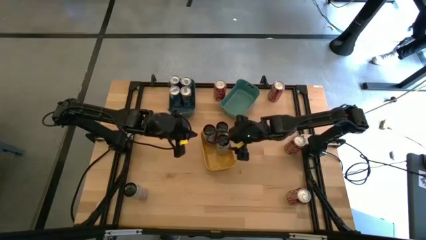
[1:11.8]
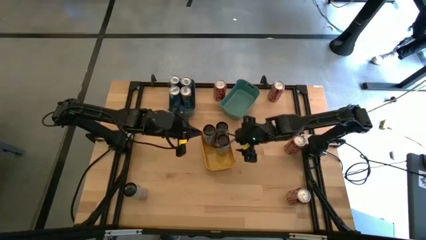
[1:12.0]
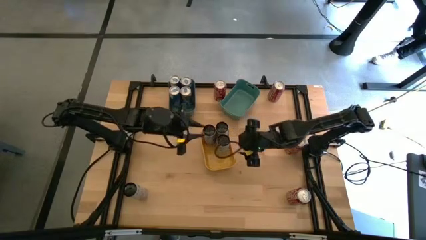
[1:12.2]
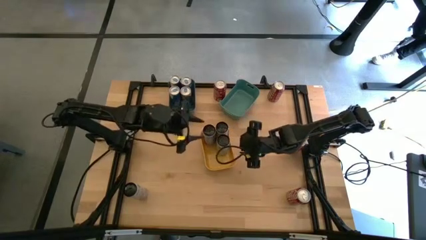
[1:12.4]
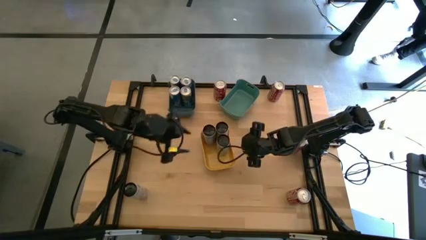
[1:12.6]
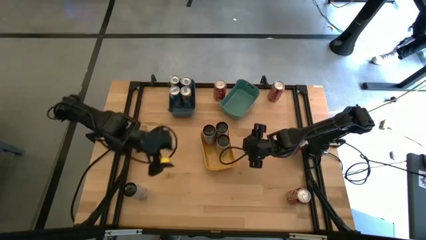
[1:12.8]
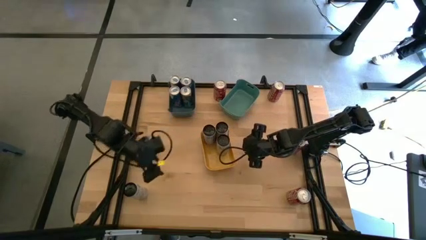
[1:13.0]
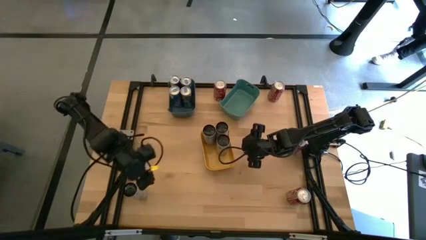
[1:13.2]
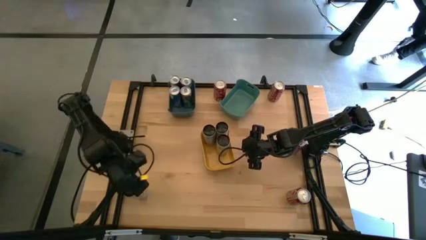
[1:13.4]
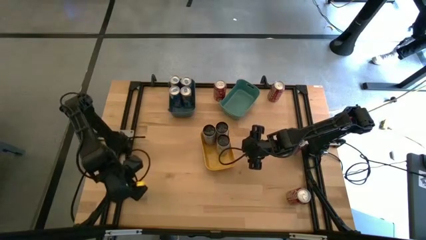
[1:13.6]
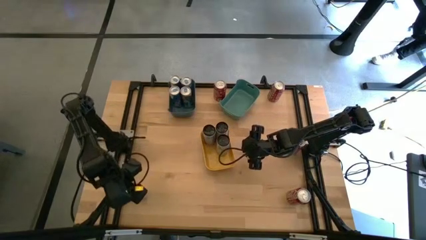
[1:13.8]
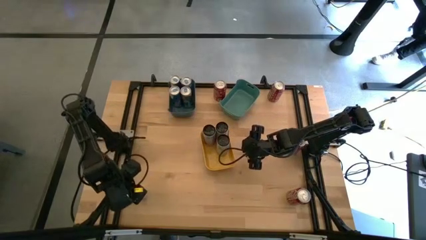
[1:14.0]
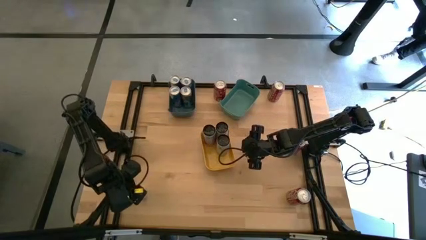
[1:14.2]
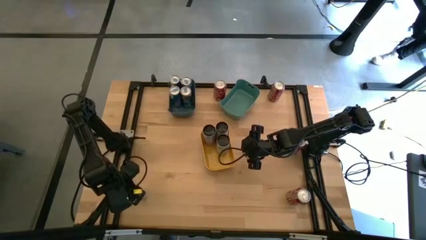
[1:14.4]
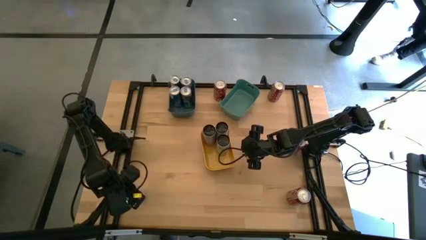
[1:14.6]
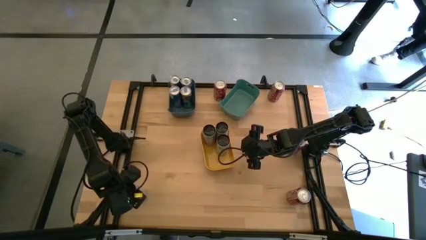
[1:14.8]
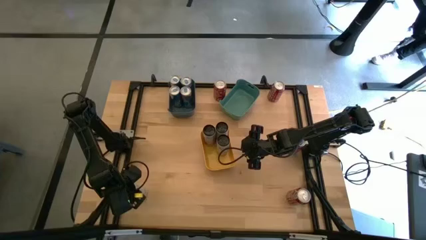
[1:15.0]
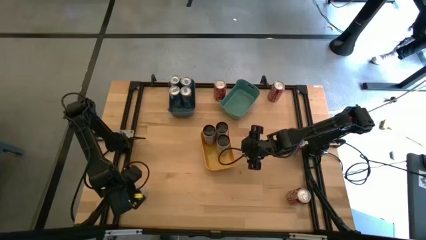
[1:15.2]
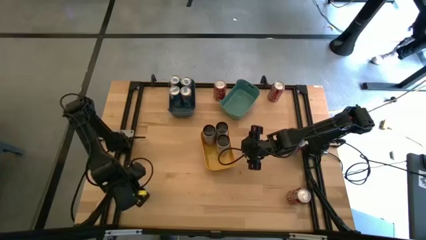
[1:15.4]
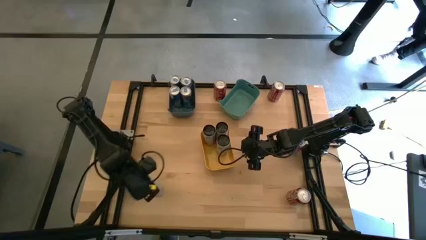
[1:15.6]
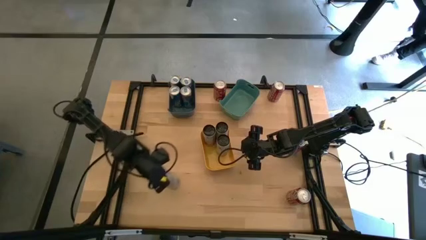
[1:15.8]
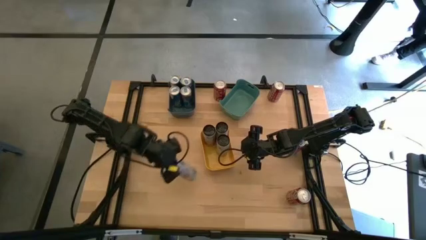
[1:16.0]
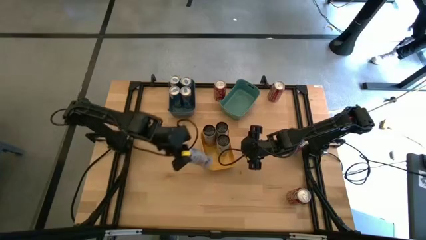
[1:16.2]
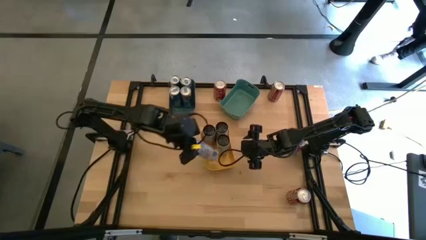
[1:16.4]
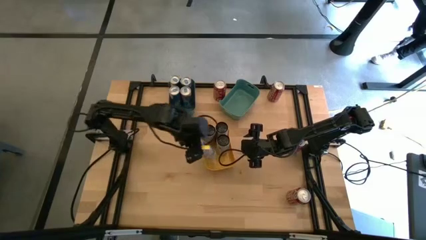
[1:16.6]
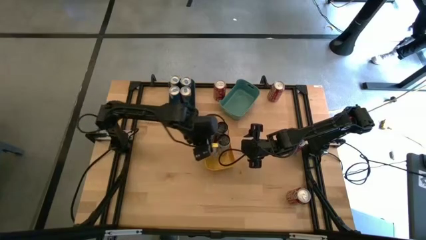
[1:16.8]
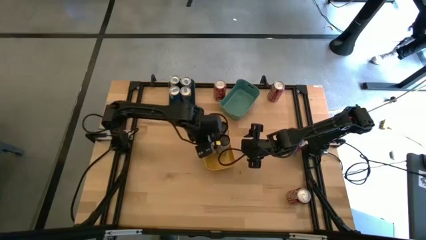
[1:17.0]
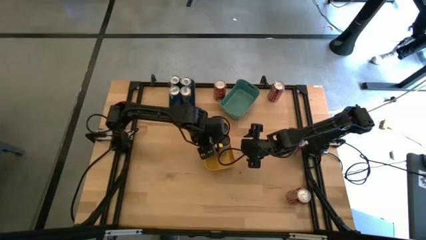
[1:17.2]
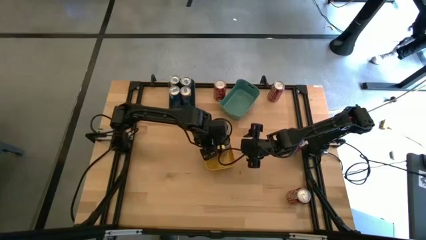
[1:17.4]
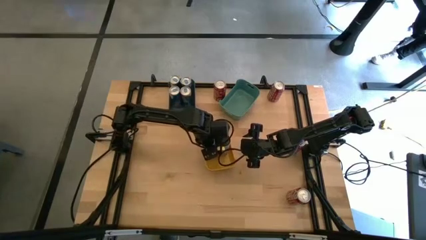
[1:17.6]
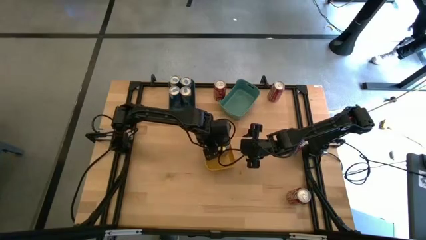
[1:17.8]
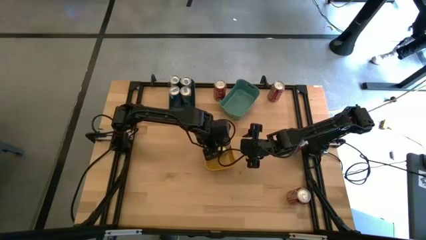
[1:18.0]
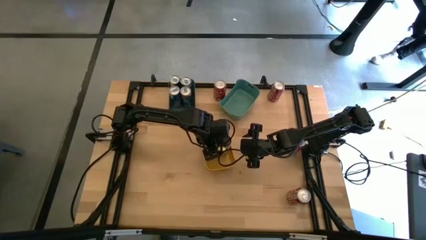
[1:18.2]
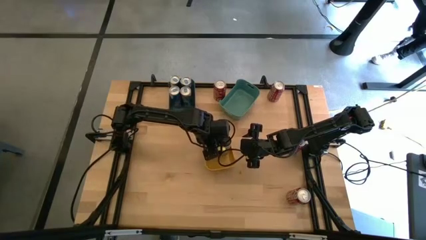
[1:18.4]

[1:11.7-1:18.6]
Task: Sort soda cans
Put the white pink soda can into the yellow bin

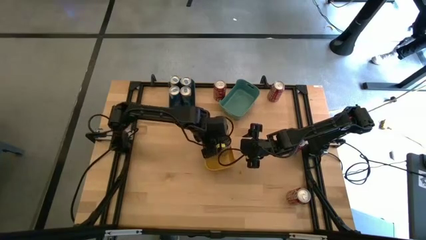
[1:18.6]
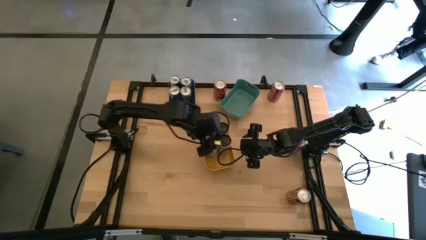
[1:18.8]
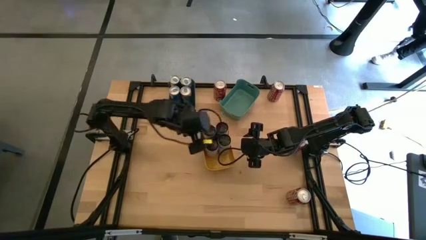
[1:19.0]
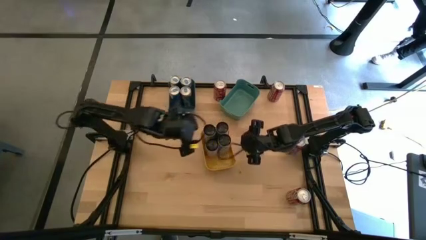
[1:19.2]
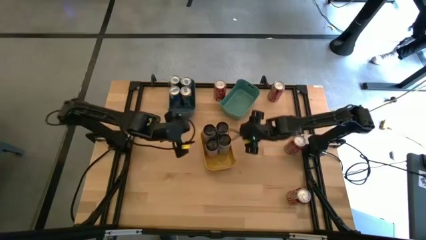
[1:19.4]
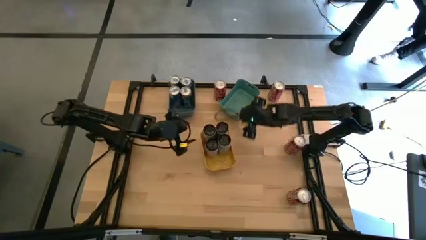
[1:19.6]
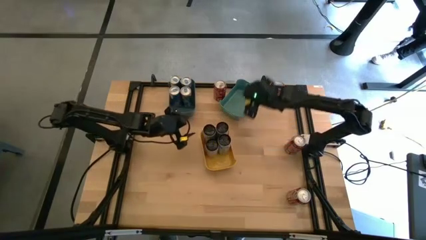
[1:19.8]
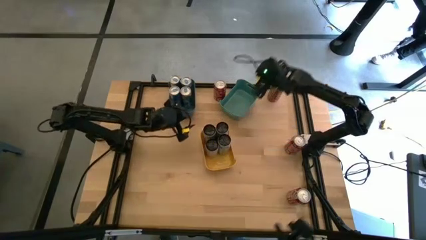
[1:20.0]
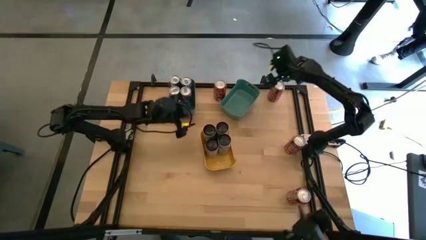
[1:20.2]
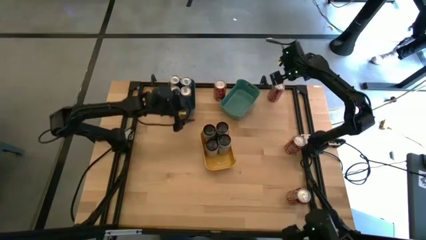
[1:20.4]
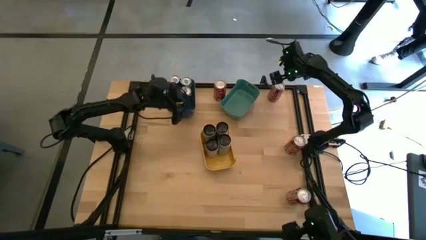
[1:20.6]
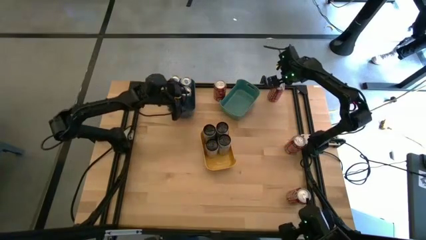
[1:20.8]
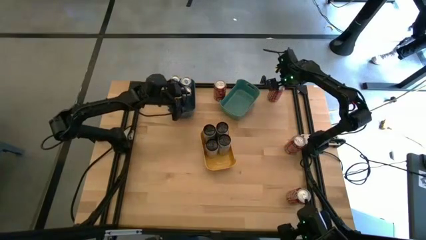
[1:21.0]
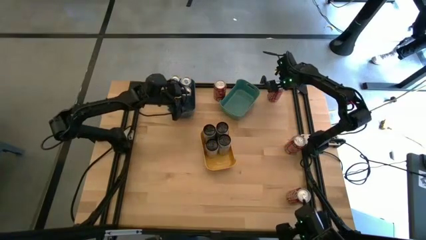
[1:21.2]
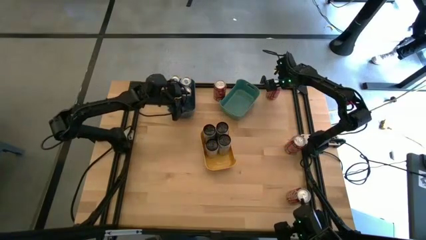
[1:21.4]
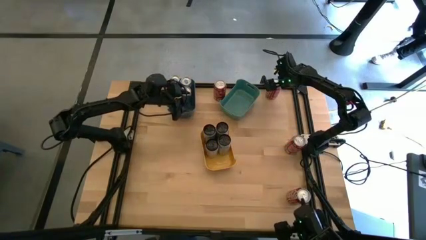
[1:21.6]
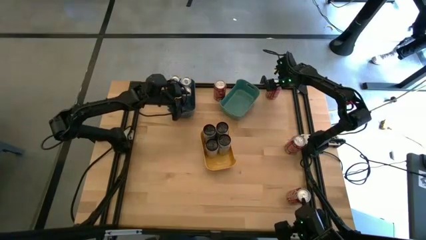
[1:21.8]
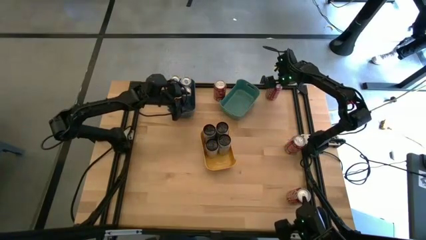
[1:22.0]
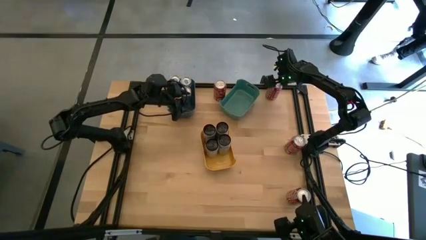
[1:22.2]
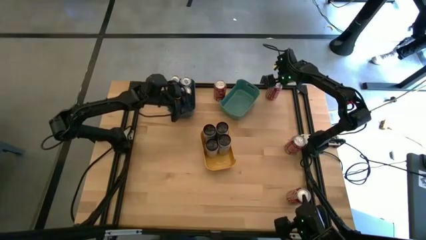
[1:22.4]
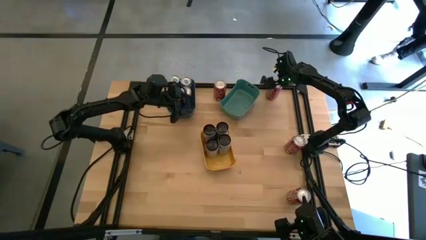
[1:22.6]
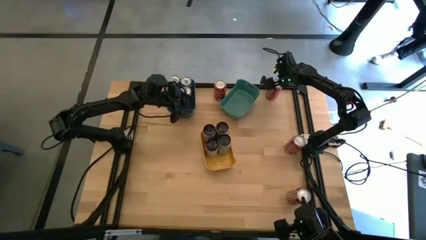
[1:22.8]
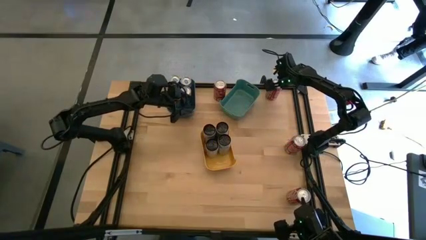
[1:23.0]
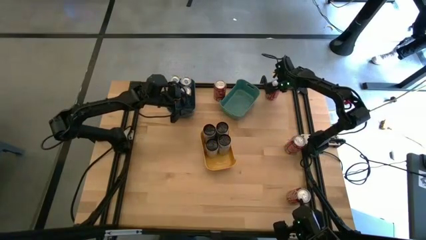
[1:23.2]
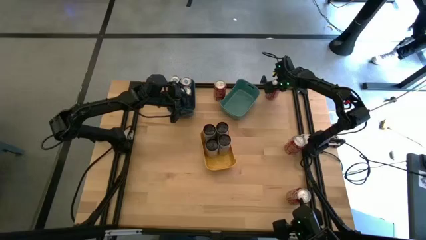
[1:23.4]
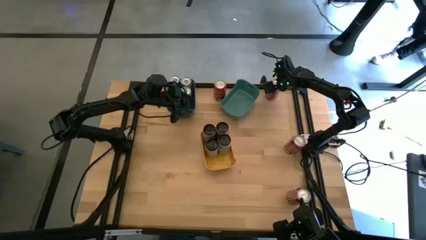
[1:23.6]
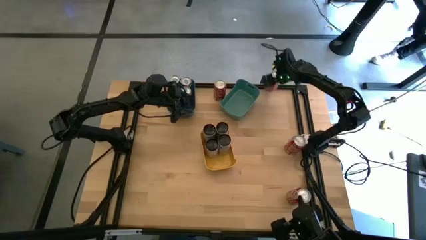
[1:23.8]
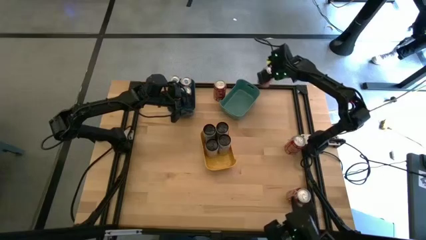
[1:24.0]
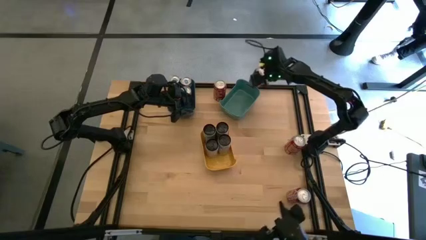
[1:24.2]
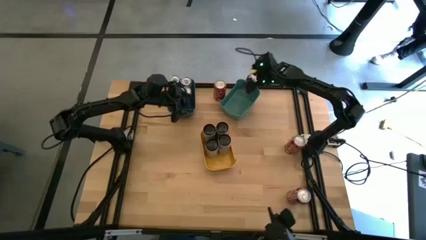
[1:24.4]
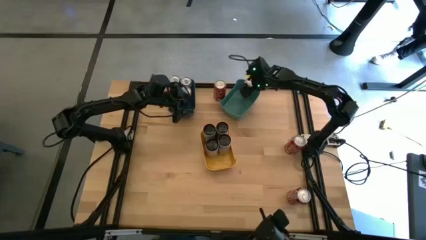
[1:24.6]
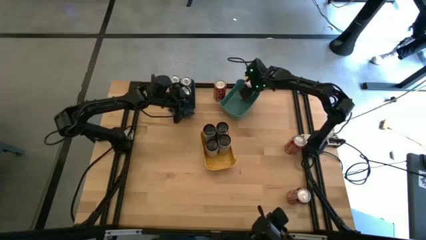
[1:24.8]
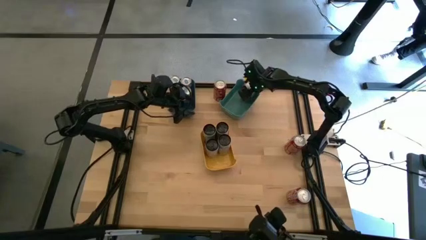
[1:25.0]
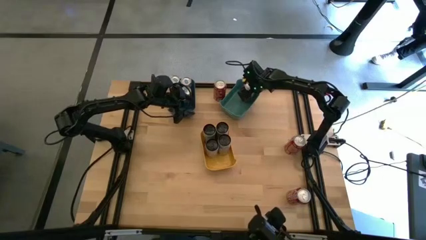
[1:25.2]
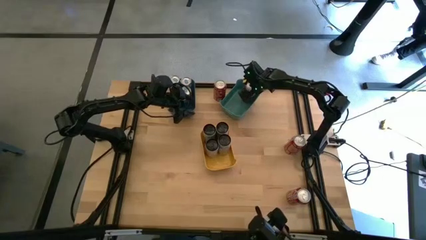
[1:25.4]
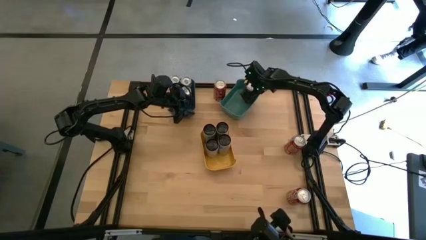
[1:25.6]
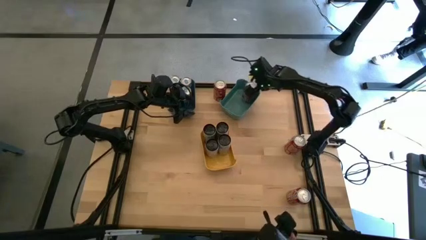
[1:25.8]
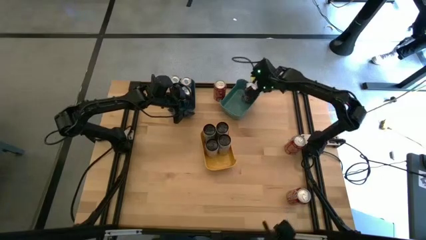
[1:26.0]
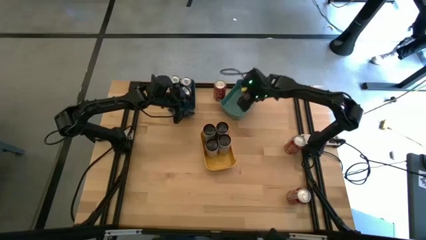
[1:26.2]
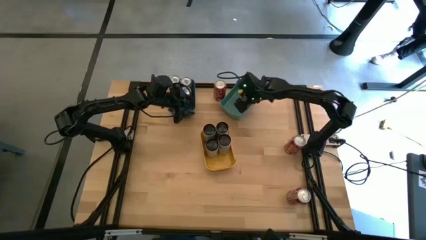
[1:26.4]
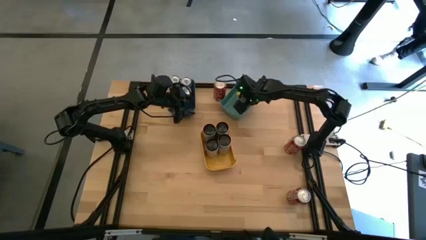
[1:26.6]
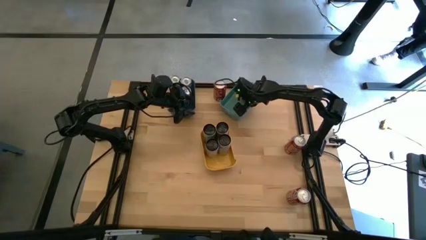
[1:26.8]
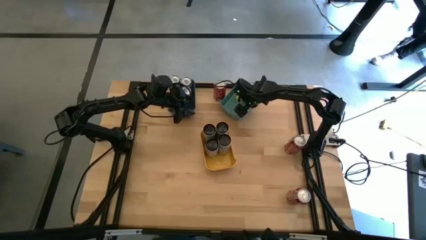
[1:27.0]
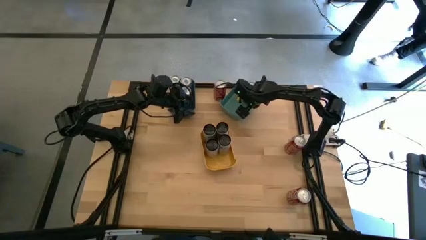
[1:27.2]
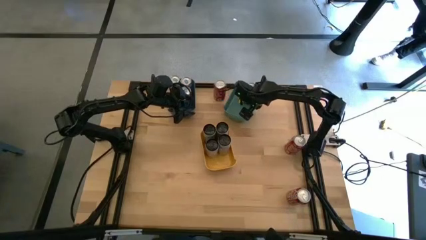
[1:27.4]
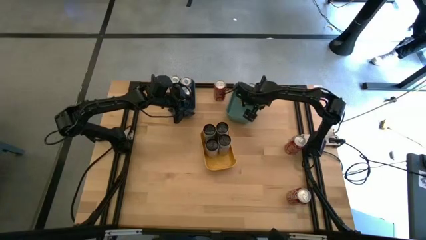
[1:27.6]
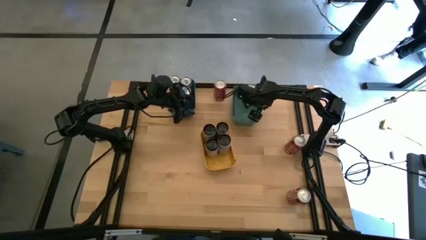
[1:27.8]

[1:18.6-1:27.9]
Put the top right red soda can into the green bin
